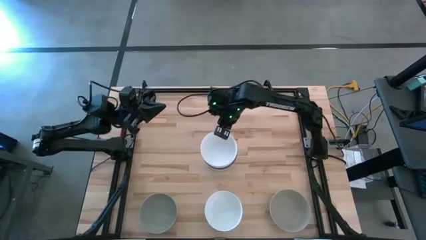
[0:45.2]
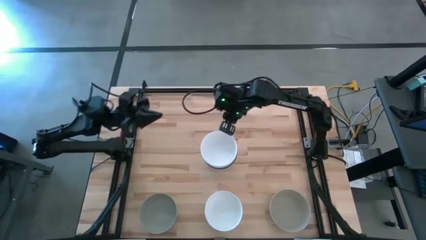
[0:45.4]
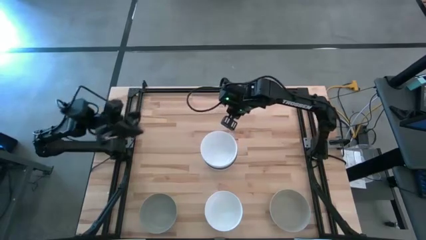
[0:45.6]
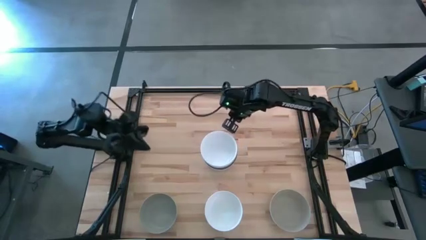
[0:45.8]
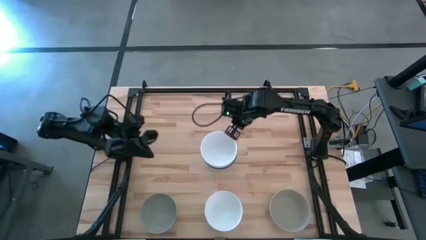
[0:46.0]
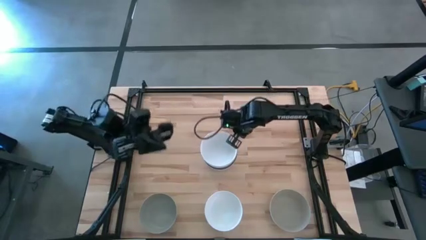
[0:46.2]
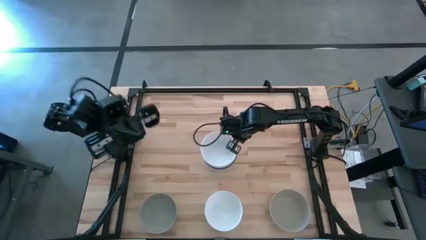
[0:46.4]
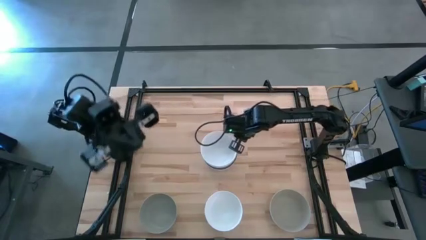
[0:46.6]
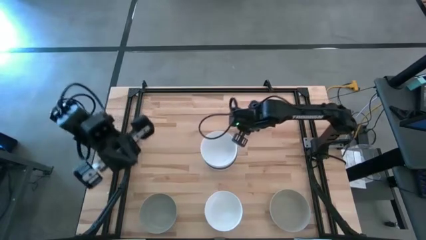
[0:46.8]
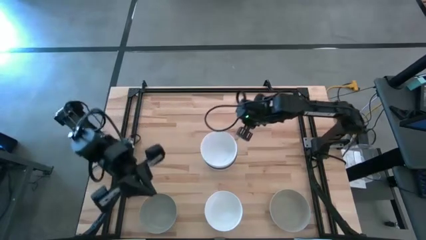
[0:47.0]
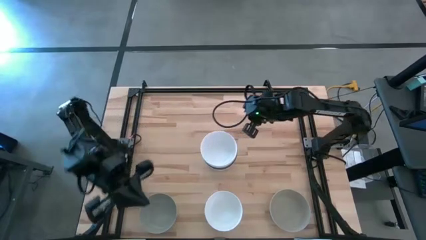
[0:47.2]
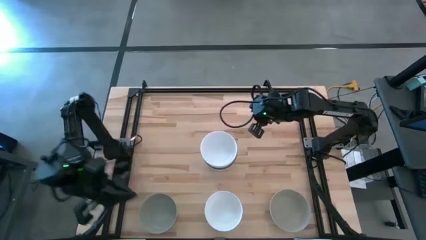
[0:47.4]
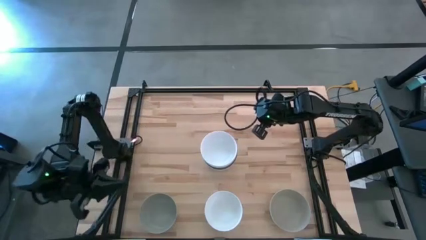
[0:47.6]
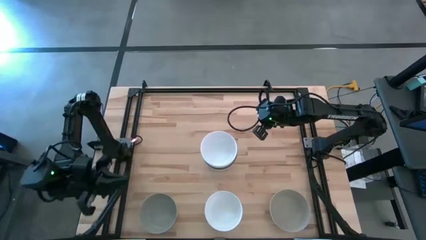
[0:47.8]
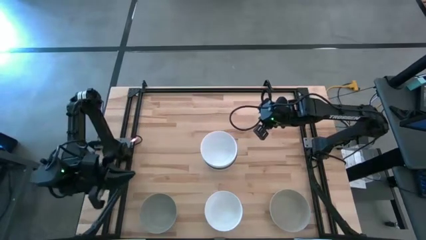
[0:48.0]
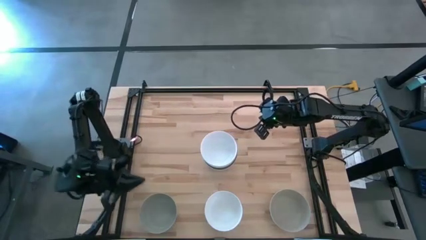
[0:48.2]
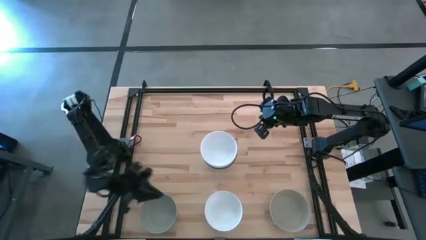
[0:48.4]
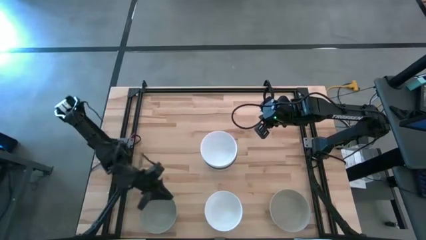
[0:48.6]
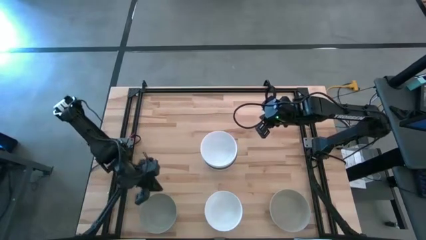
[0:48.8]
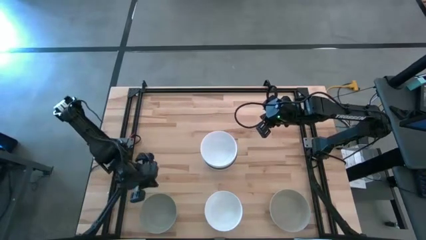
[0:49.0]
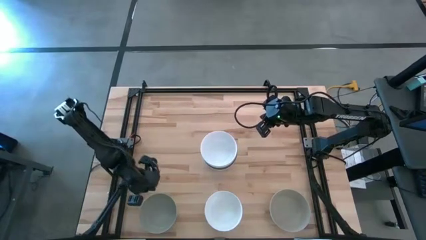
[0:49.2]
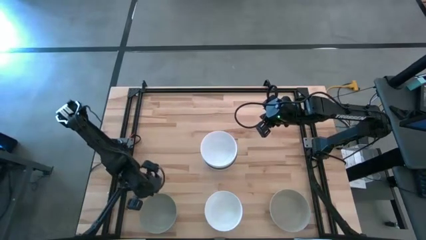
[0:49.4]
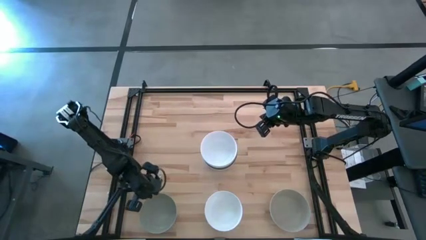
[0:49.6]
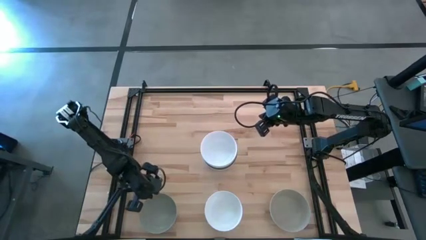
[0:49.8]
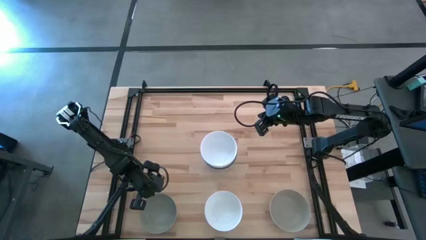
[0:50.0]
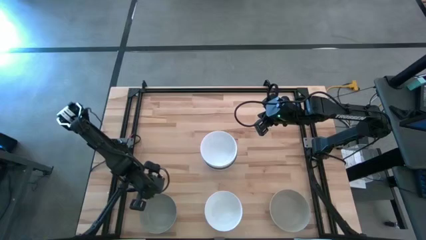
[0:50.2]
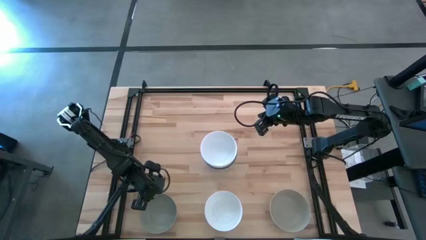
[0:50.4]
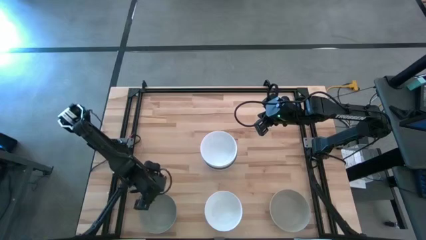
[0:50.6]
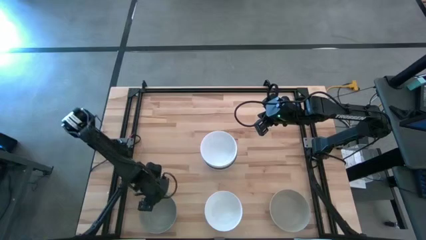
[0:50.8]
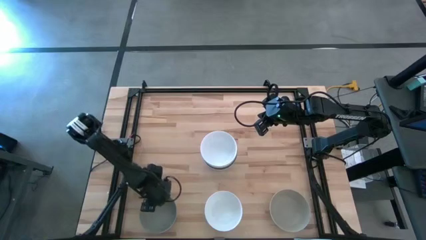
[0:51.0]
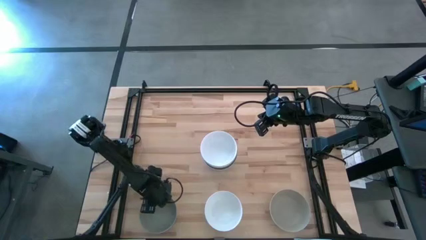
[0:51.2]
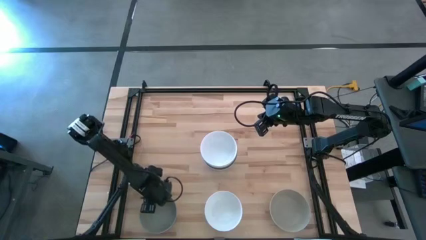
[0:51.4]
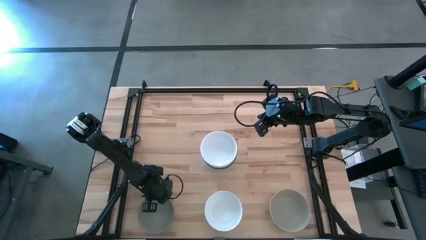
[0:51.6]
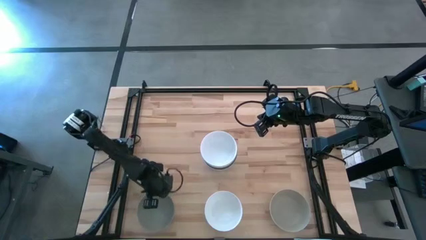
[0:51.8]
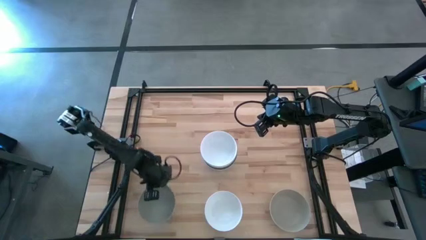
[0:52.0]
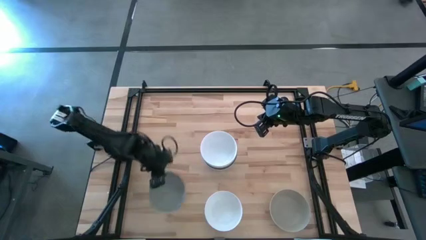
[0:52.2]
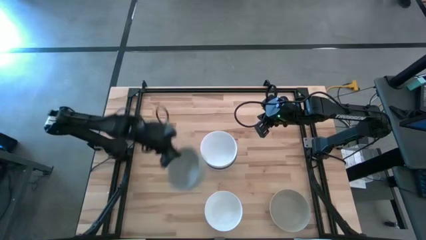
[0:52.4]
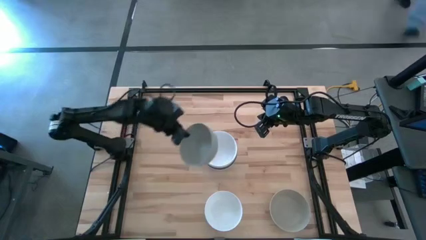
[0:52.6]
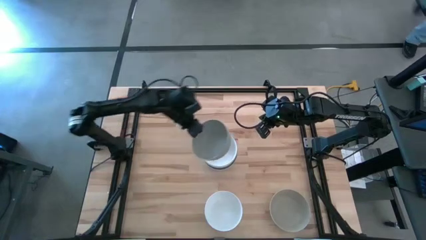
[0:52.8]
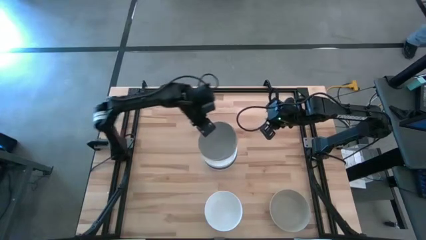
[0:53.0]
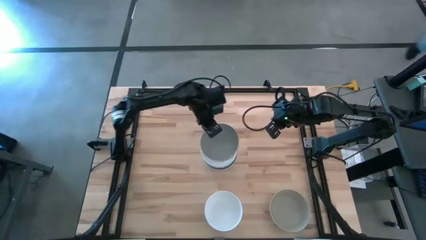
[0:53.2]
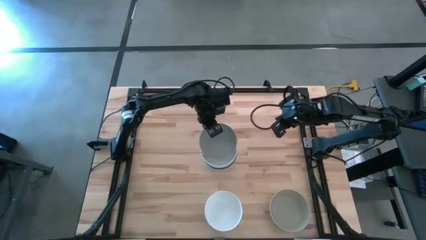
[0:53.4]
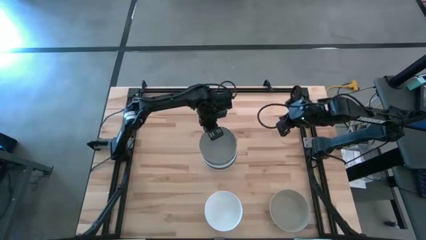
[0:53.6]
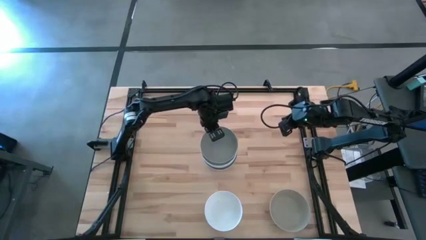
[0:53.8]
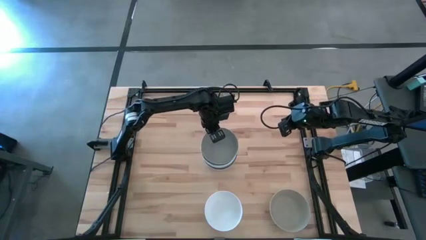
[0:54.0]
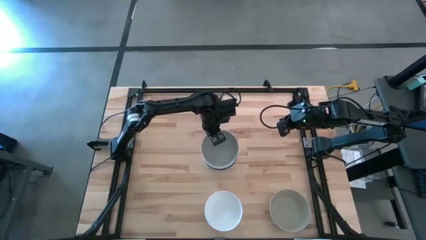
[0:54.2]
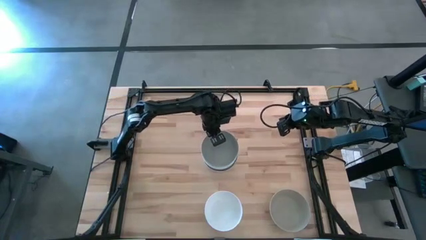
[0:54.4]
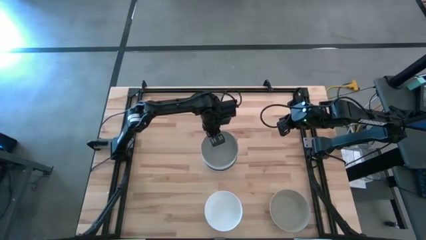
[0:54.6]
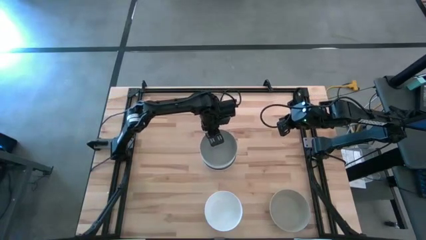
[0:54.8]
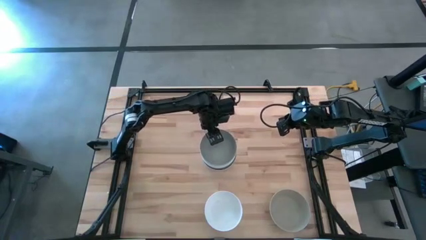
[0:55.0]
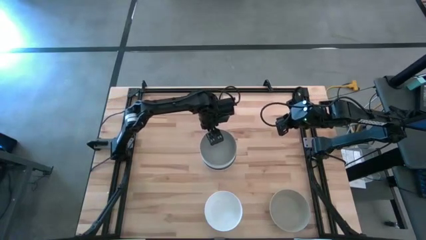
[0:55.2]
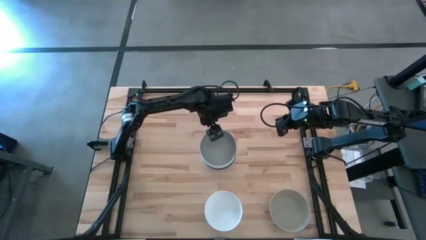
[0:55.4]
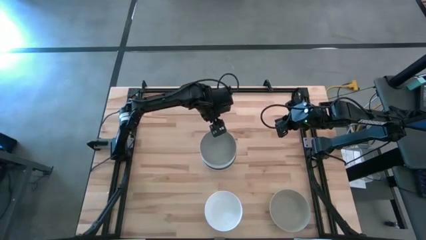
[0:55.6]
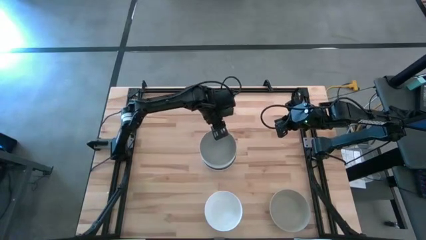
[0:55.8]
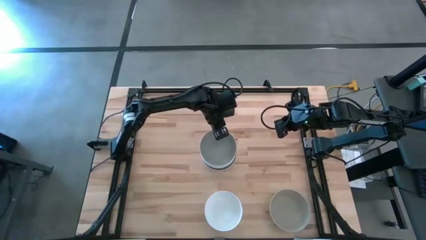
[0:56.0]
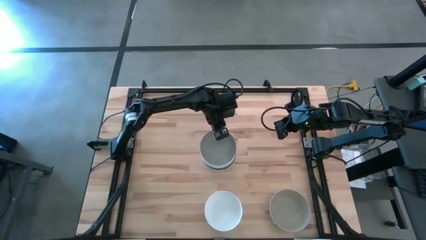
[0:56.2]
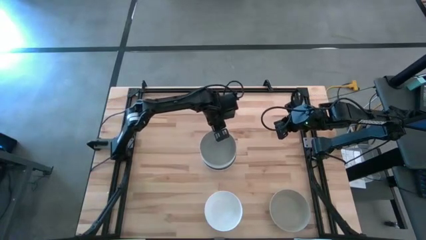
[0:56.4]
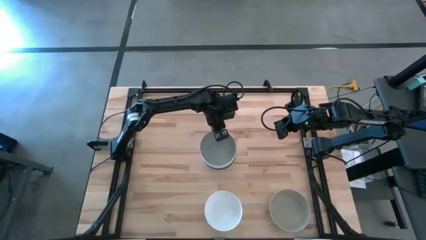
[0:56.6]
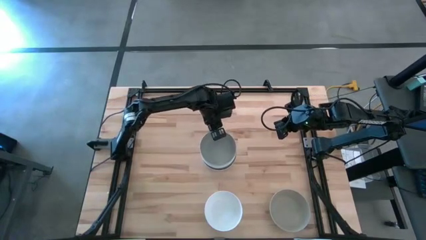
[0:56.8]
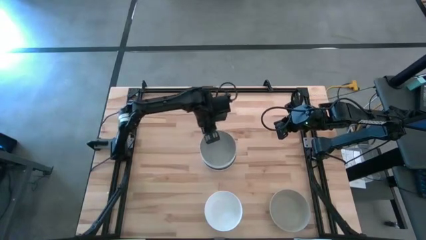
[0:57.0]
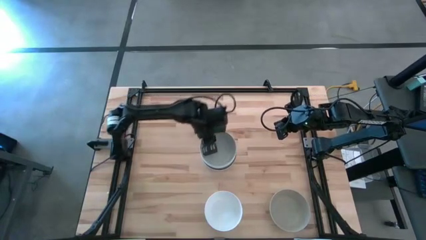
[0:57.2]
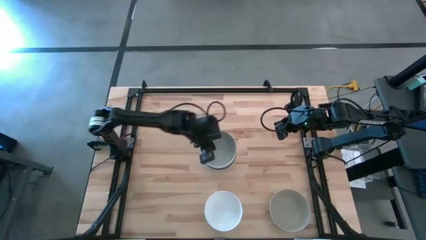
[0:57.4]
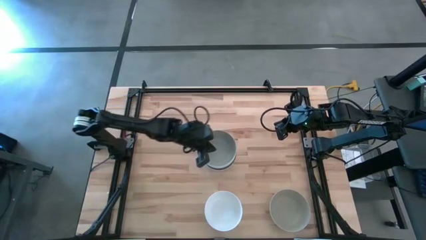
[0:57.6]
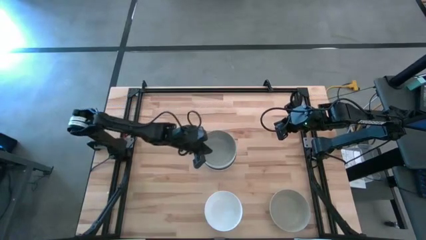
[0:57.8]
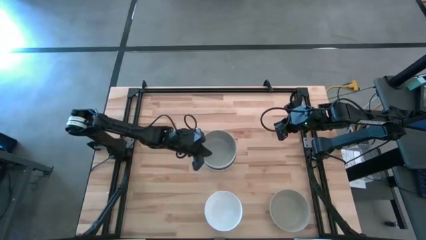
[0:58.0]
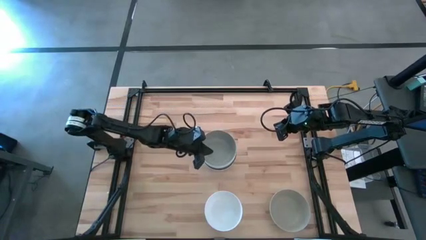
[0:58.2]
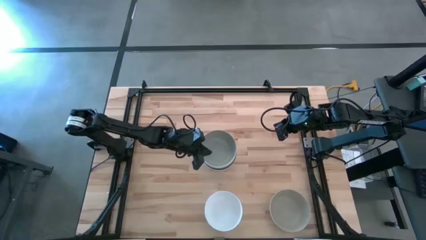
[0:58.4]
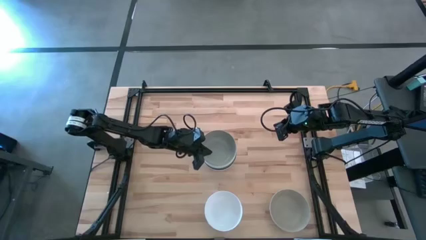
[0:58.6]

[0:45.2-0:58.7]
Task: Nest bowls inside each other
Stack the brown bowl on the white bowl
